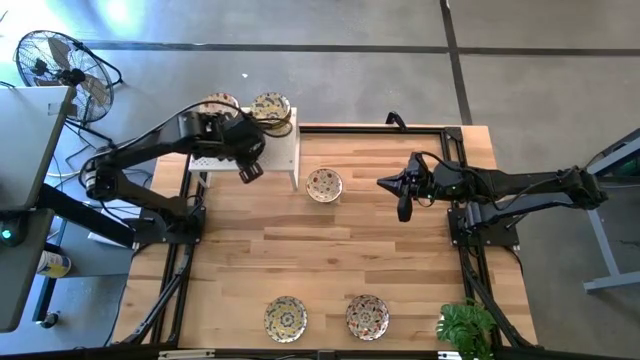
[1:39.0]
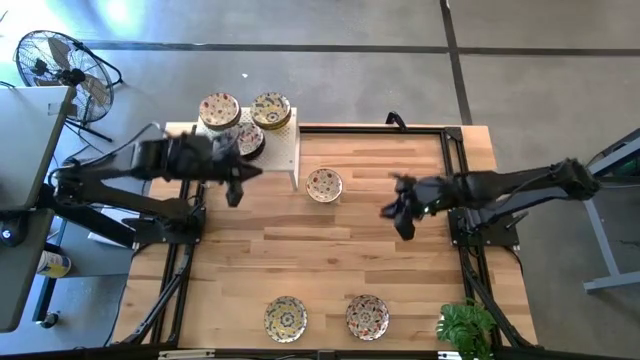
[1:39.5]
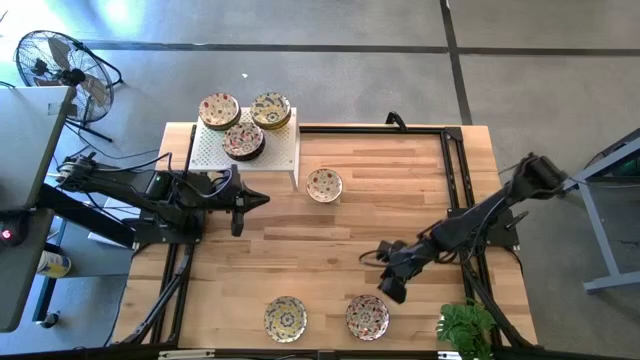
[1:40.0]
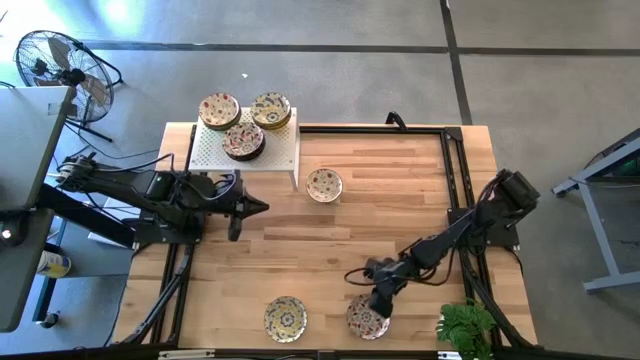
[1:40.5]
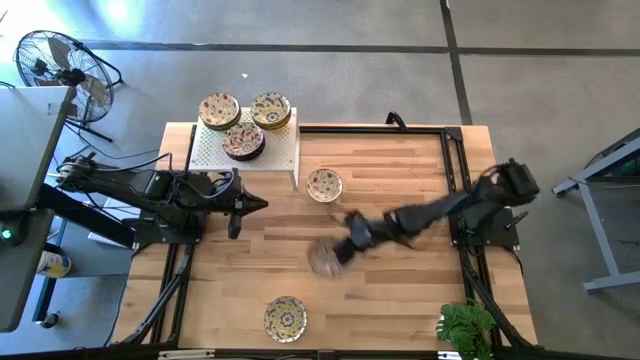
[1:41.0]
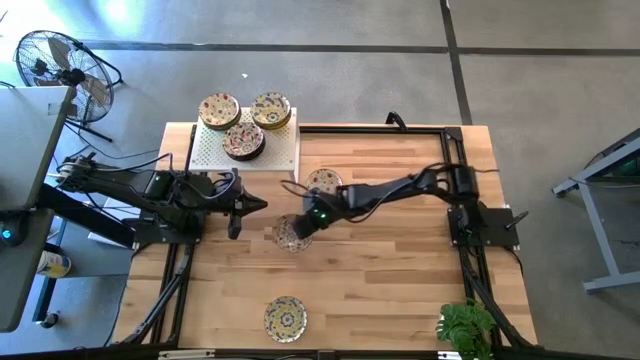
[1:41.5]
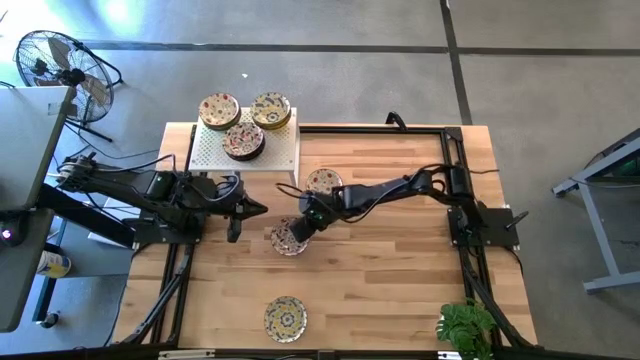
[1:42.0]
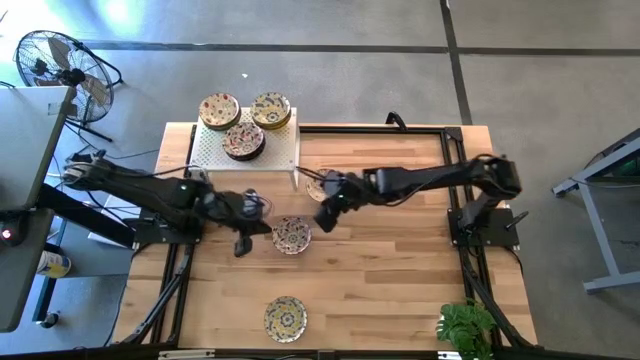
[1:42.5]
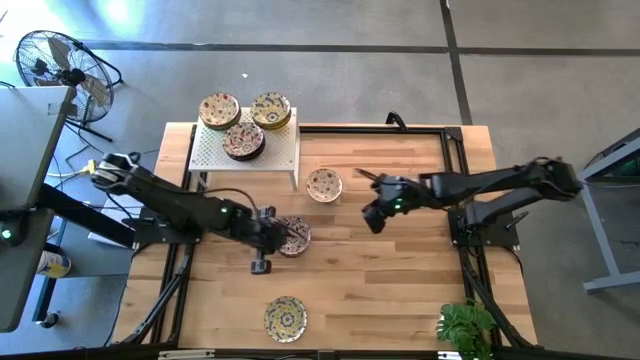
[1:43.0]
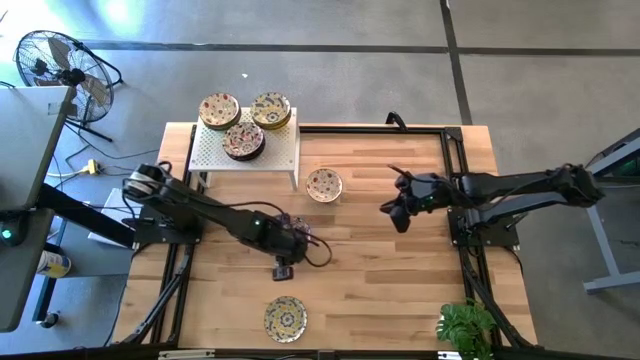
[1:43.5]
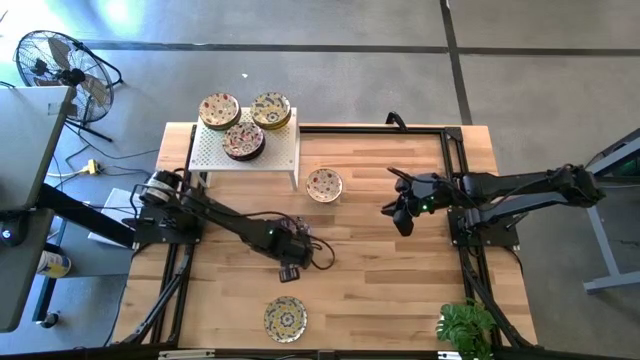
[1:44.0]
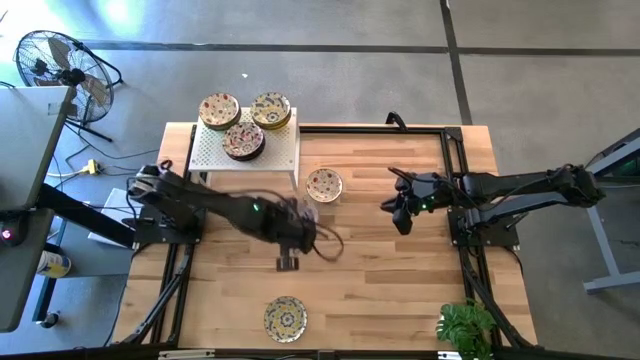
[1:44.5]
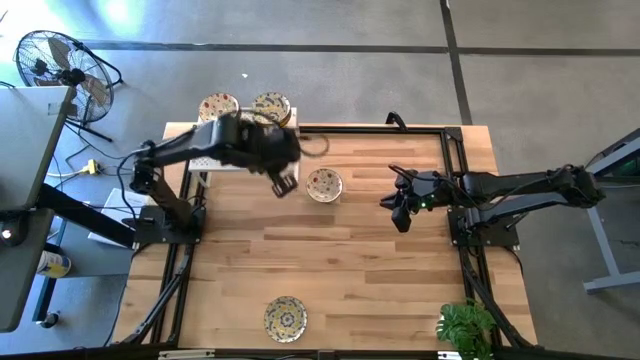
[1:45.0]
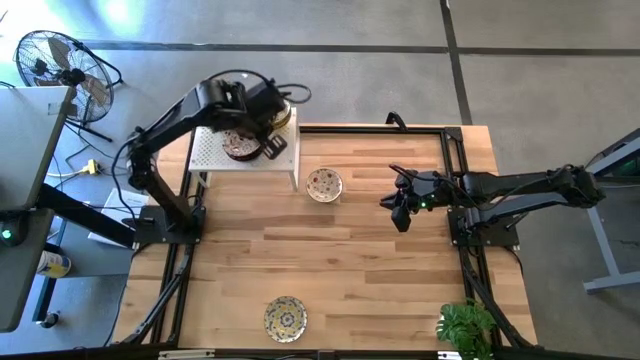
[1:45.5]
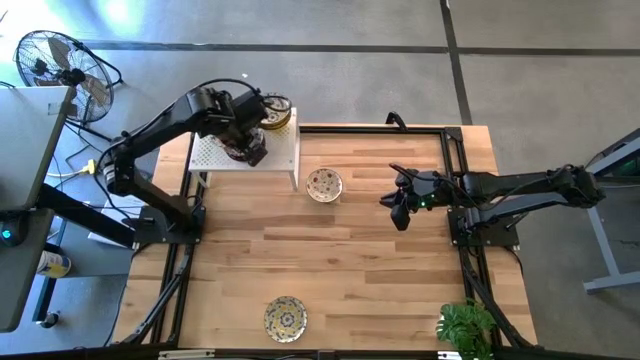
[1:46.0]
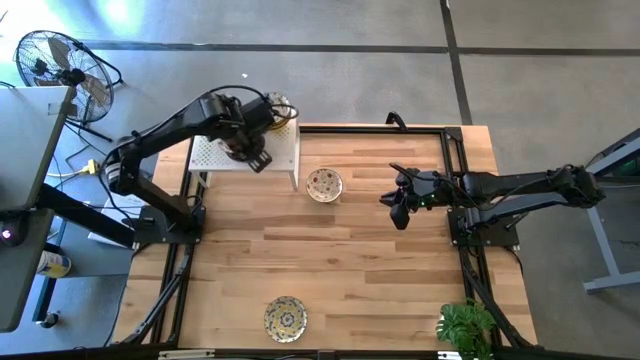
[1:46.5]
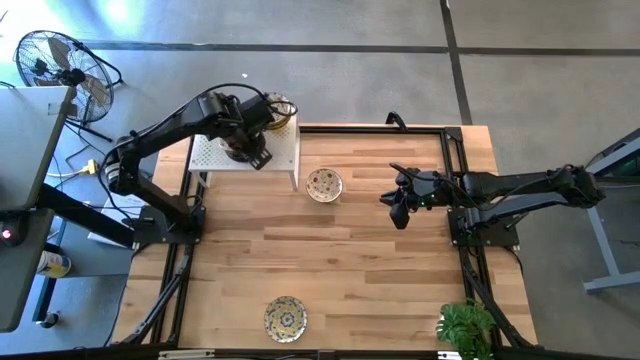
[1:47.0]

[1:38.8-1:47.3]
Task: Pick & Place Mini bowls
Stack the orange patterned bowl on the orange patterned bowl on the shelf

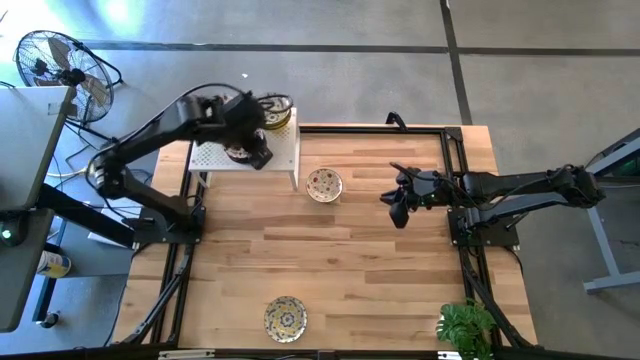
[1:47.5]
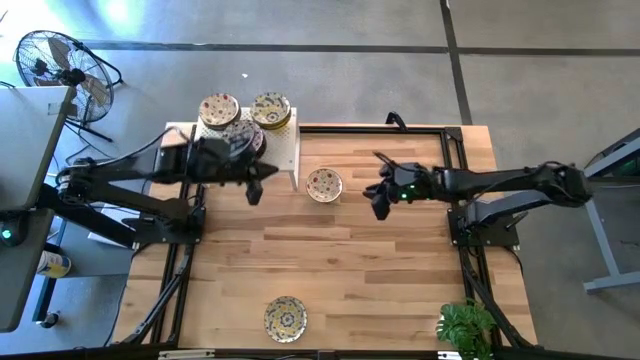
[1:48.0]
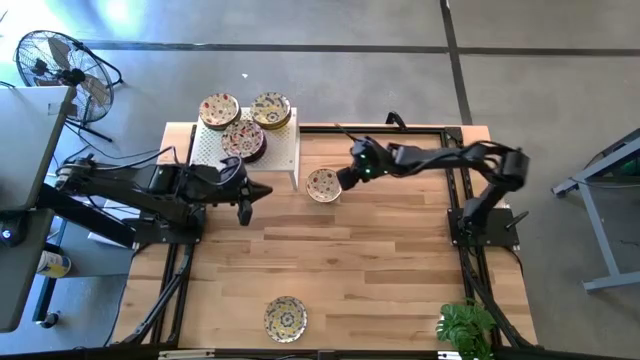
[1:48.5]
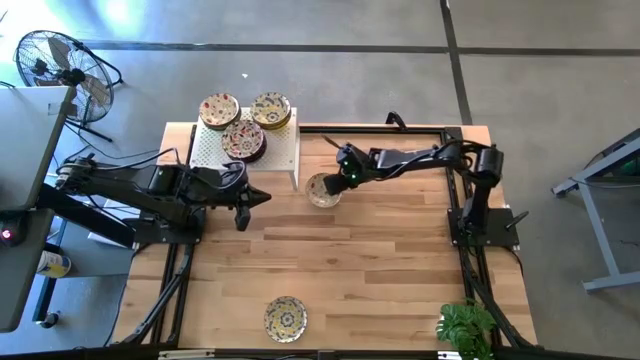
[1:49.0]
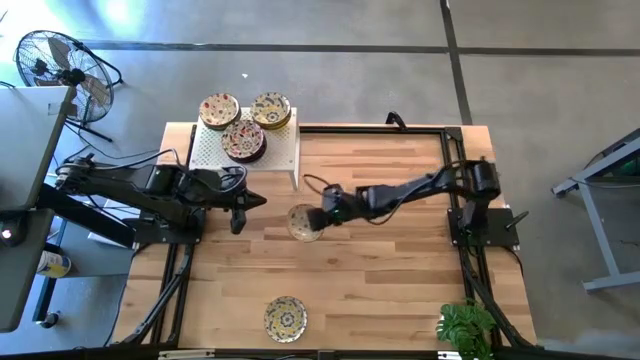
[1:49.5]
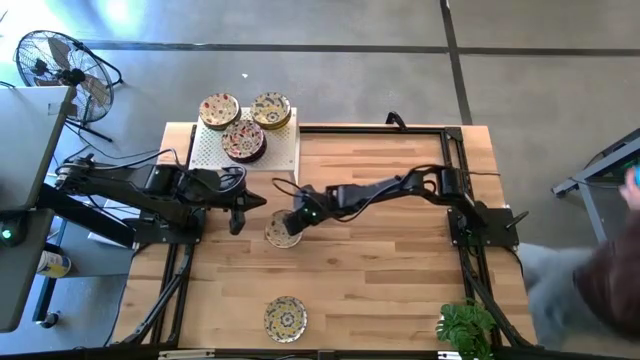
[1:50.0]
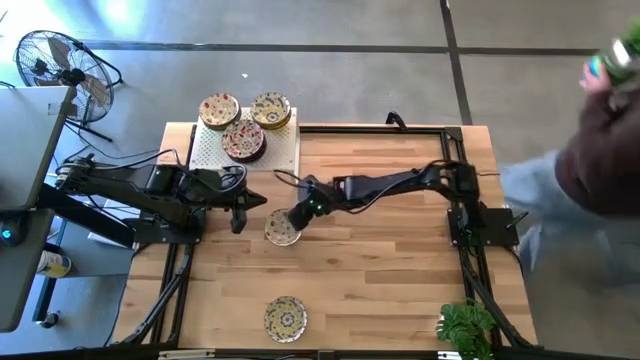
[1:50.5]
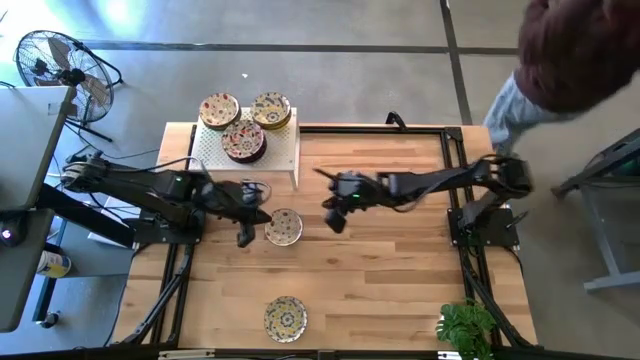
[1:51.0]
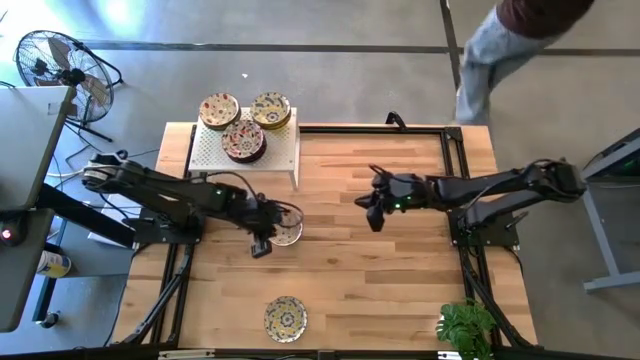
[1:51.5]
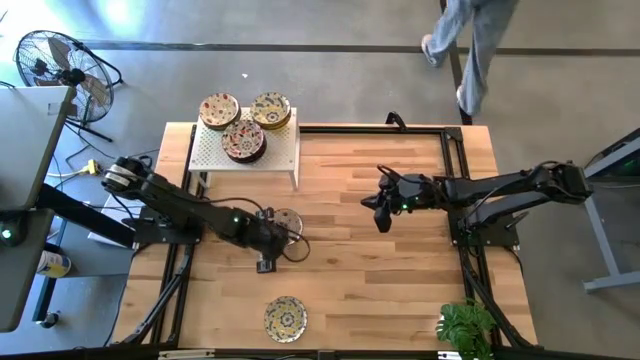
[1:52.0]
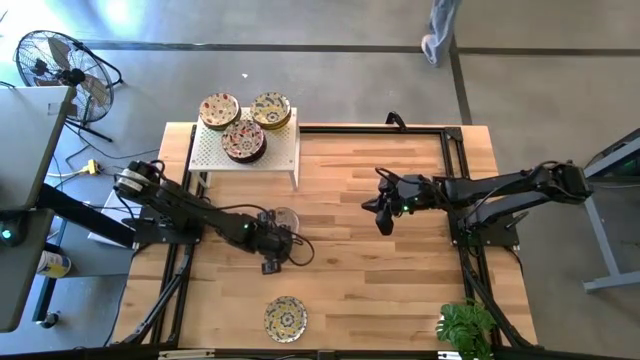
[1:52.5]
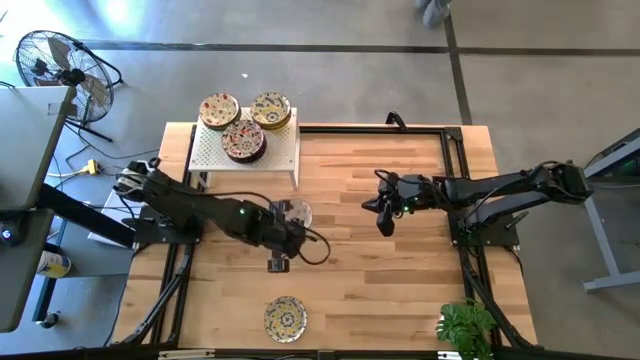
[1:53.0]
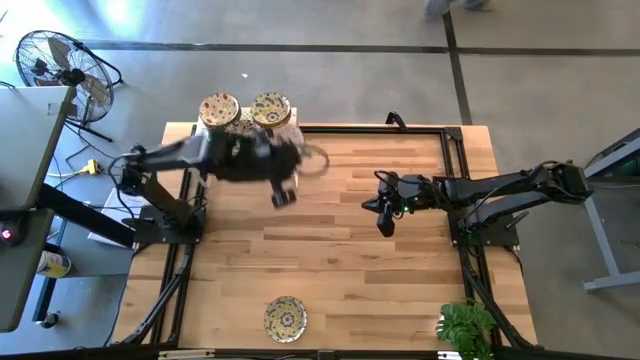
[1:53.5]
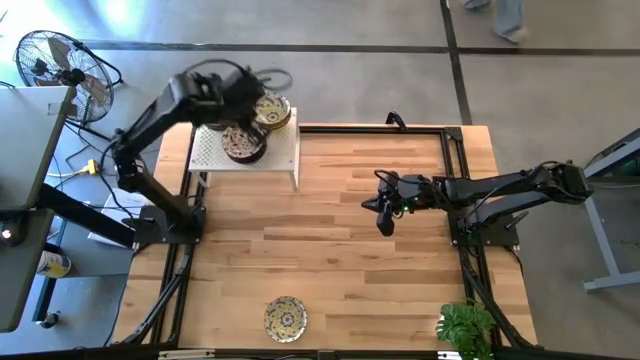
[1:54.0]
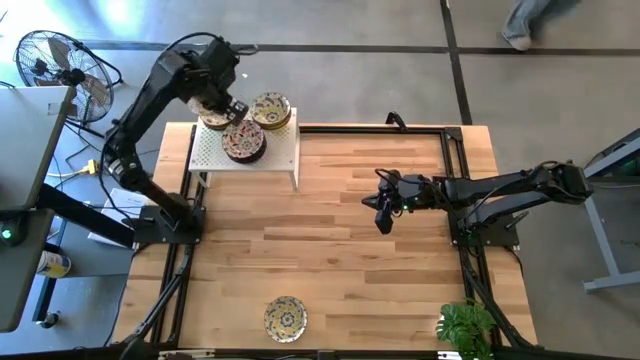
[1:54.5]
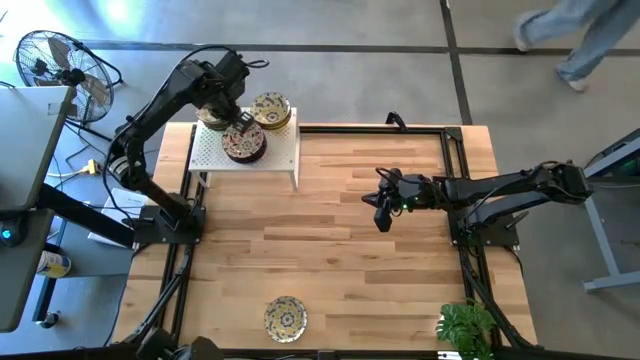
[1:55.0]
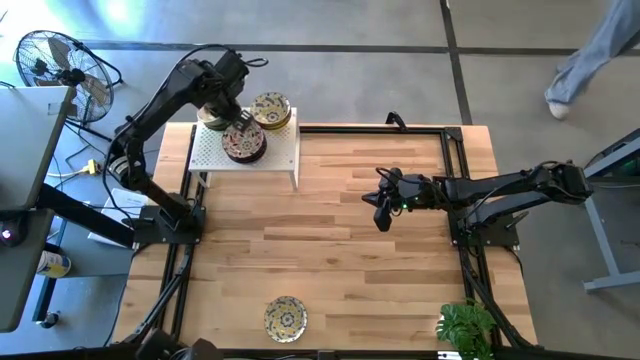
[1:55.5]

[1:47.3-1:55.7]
Stack the red patterned bowl on the red patterned bowl on the shelf

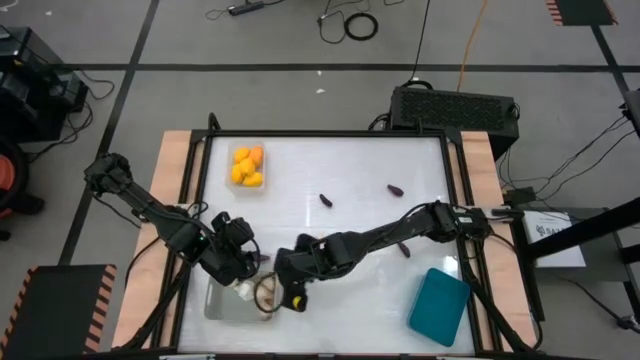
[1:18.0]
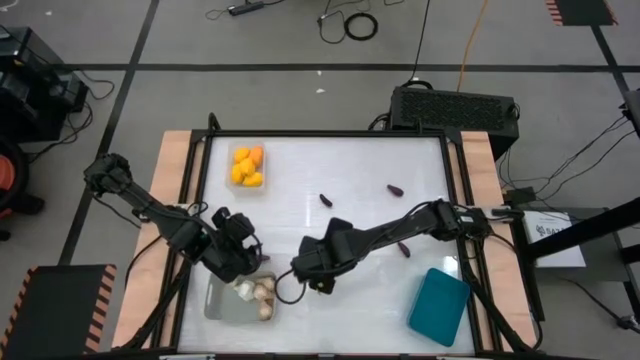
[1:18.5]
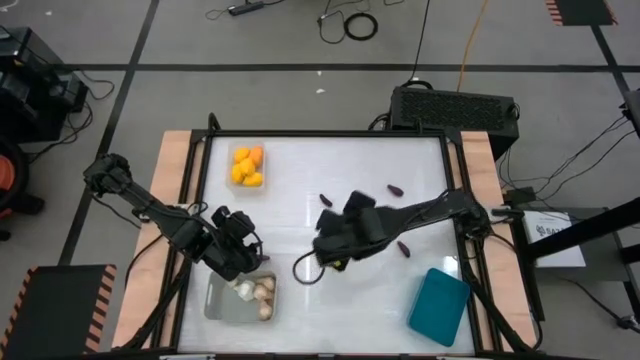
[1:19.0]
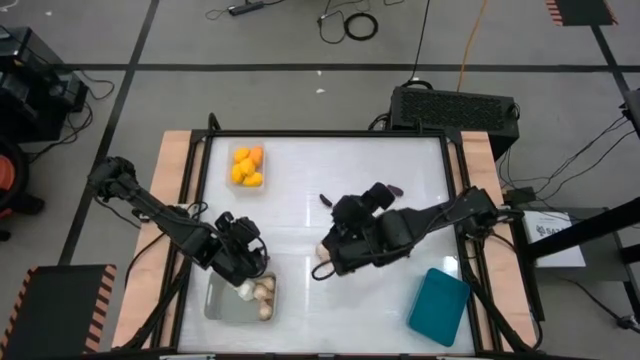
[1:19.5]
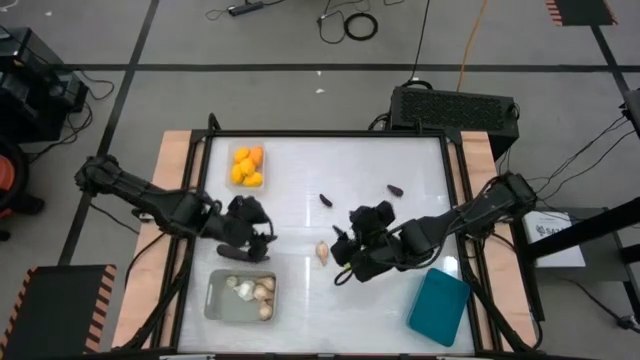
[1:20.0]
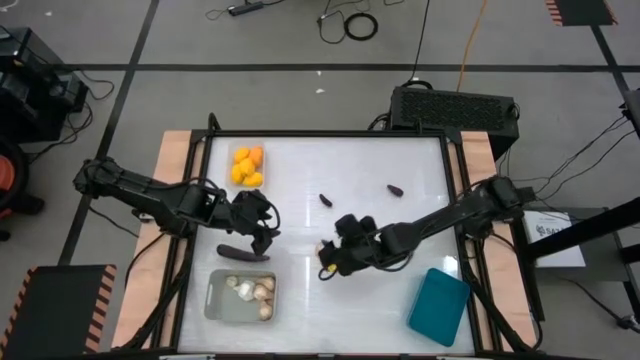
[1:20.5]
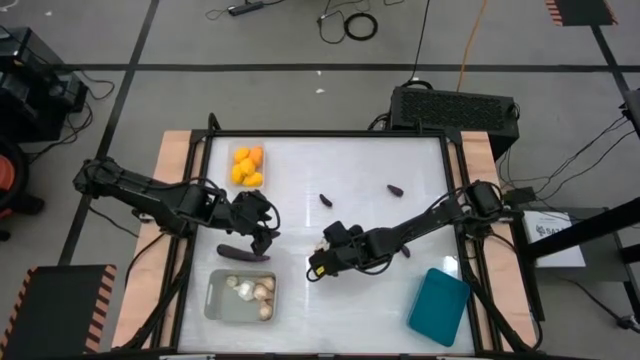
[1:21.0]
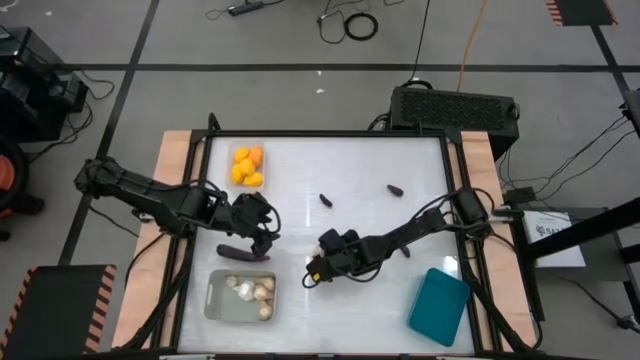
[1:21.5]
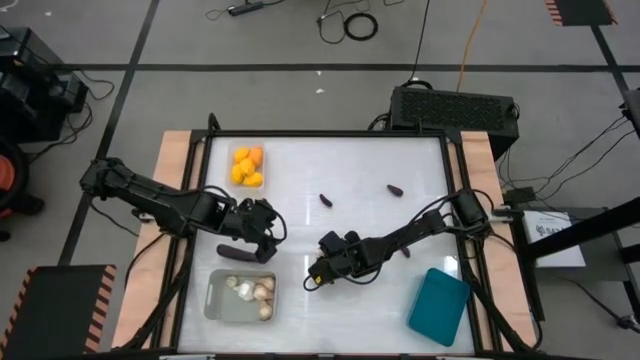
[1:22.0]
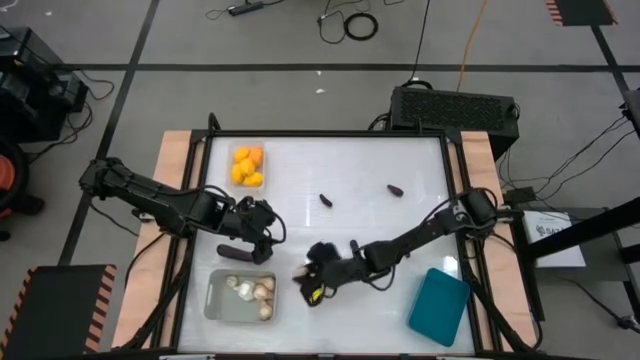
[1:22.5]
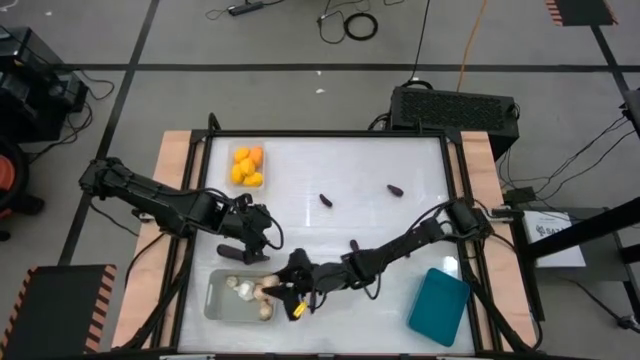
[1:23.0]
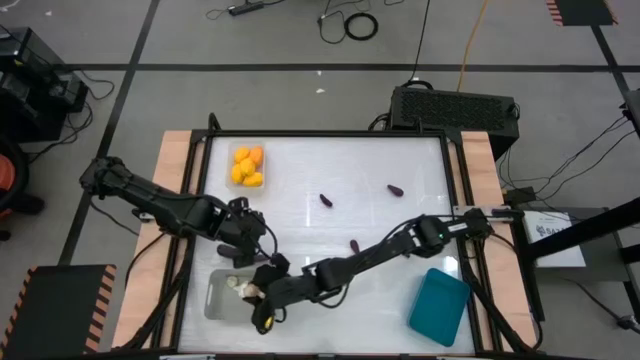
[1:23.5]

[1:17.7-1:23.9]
Task: Sort produce into baskets
Put the white garlic into the gray bin
